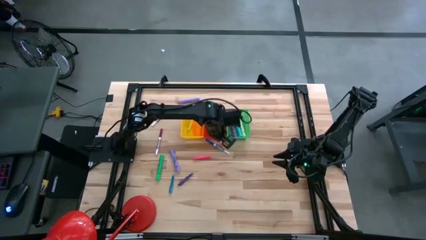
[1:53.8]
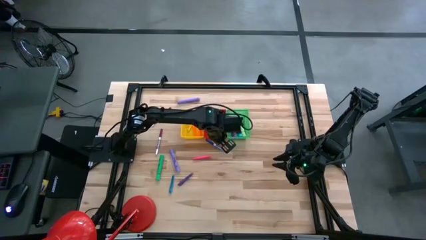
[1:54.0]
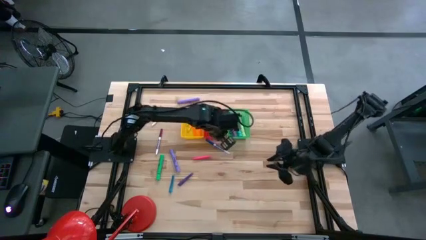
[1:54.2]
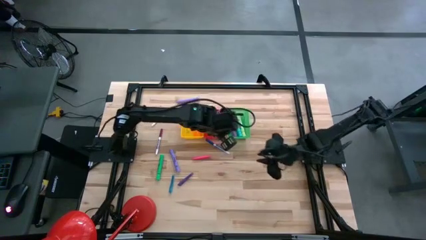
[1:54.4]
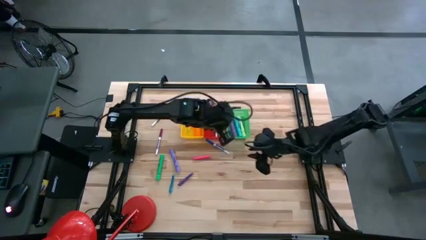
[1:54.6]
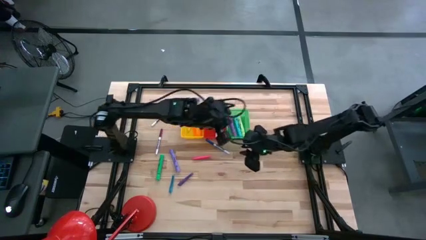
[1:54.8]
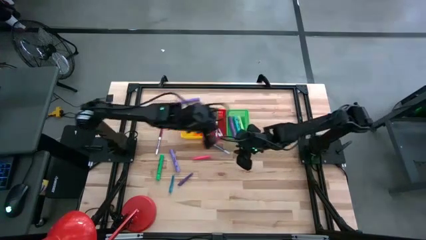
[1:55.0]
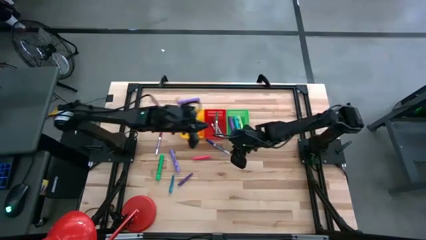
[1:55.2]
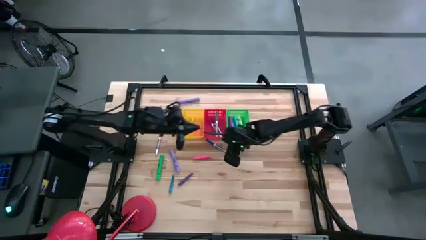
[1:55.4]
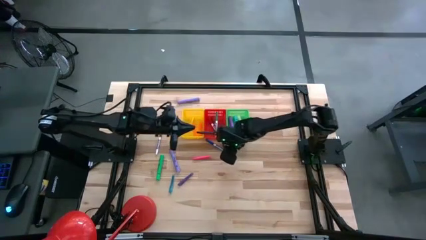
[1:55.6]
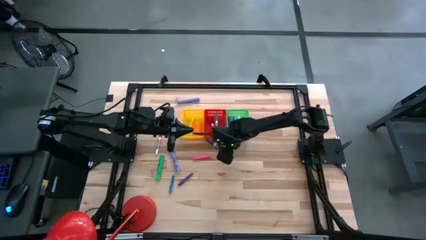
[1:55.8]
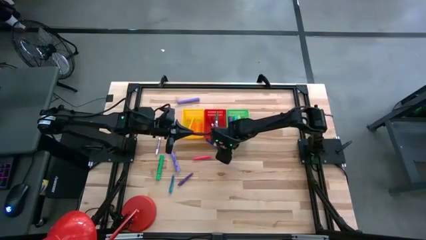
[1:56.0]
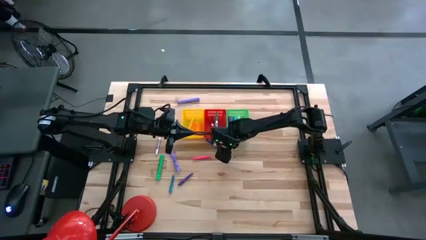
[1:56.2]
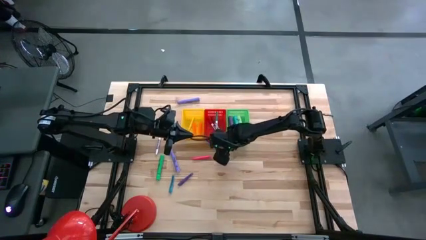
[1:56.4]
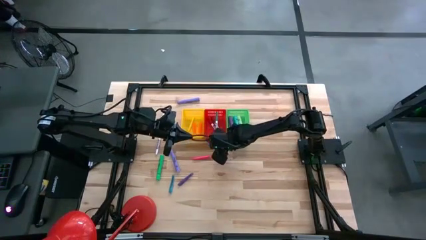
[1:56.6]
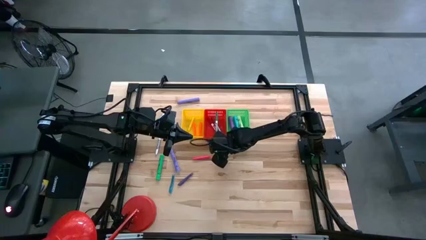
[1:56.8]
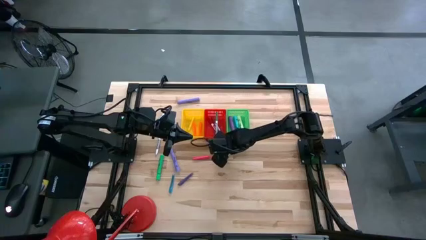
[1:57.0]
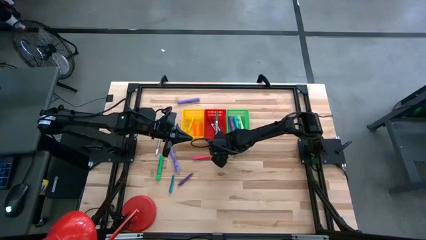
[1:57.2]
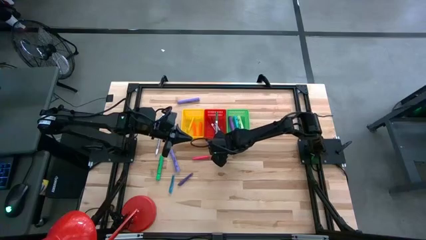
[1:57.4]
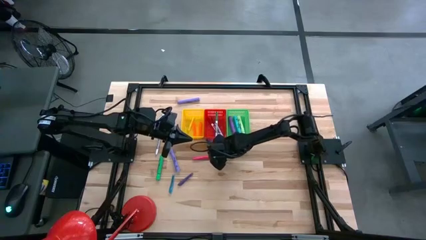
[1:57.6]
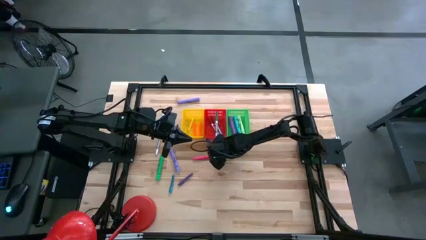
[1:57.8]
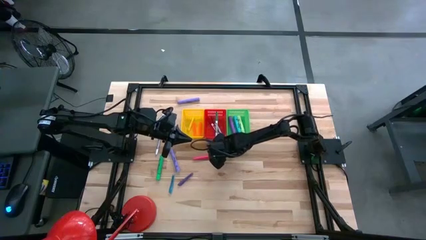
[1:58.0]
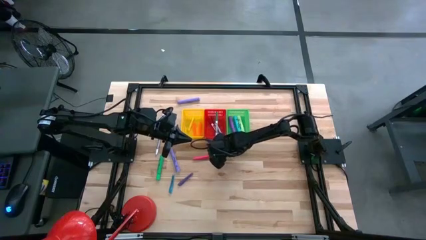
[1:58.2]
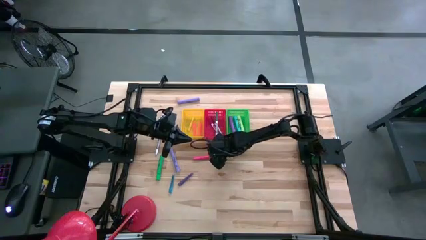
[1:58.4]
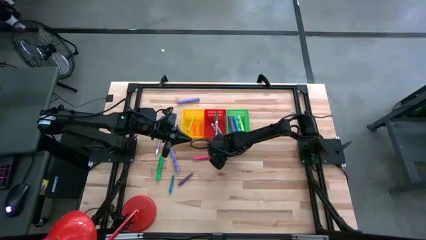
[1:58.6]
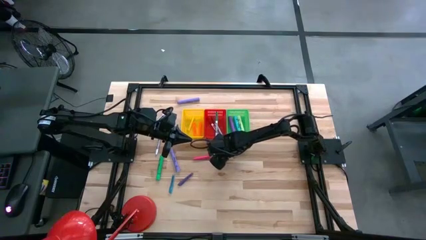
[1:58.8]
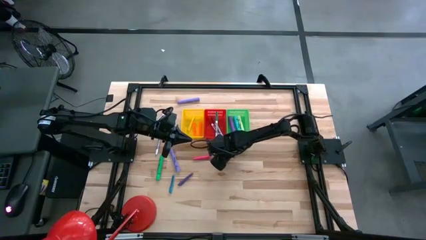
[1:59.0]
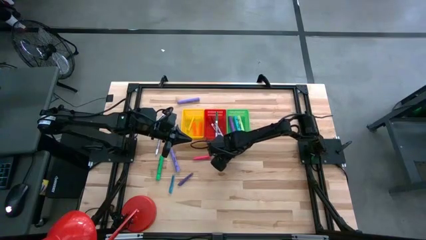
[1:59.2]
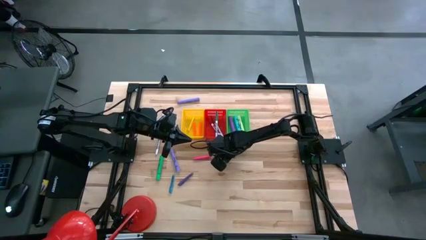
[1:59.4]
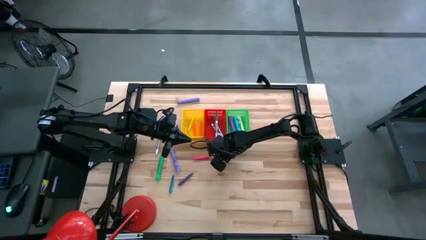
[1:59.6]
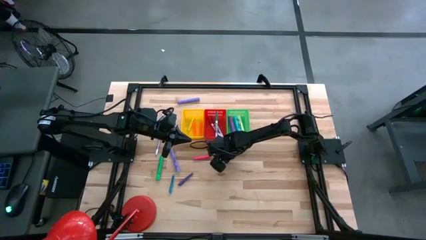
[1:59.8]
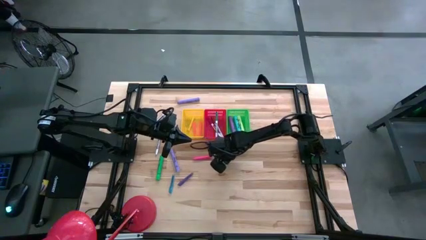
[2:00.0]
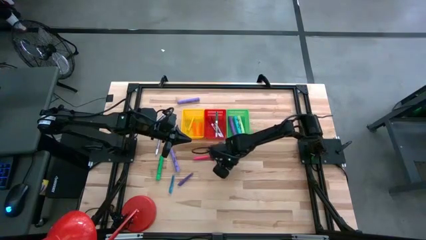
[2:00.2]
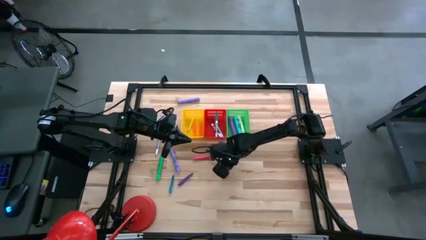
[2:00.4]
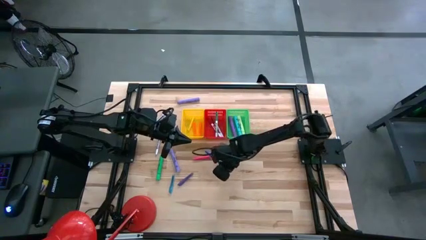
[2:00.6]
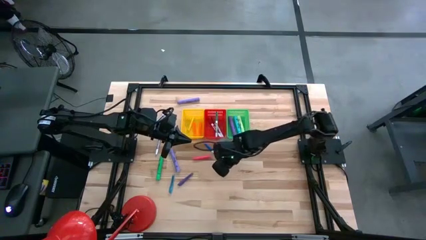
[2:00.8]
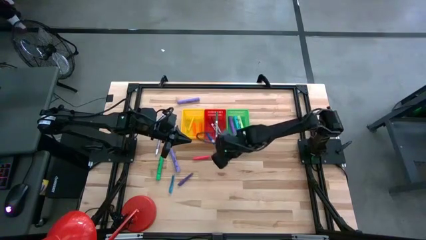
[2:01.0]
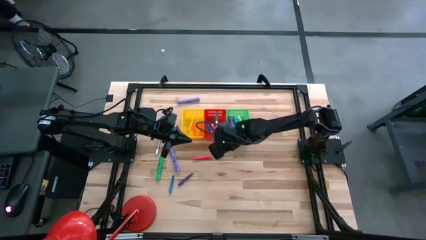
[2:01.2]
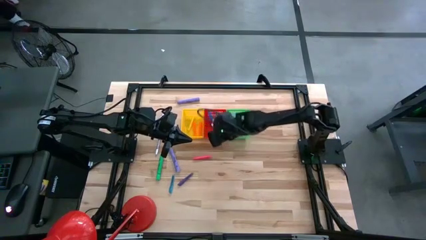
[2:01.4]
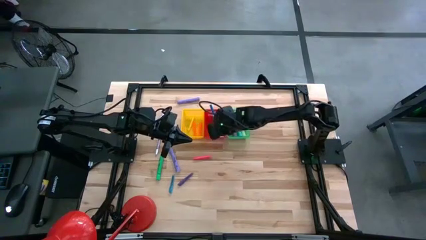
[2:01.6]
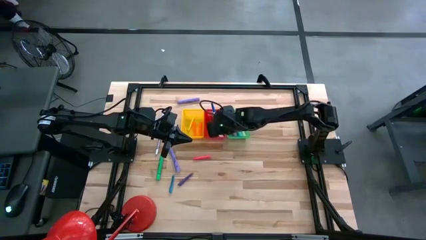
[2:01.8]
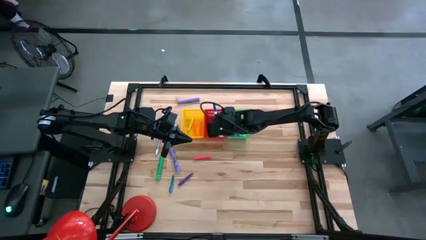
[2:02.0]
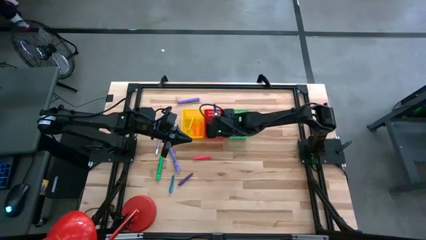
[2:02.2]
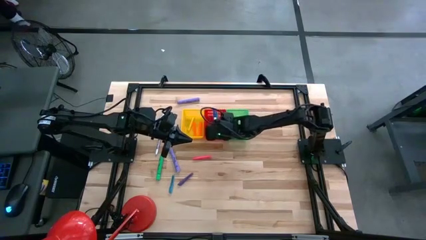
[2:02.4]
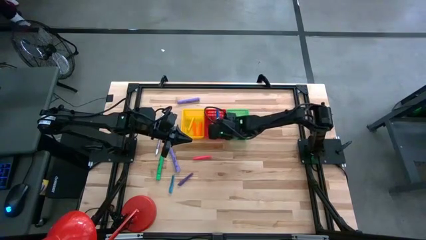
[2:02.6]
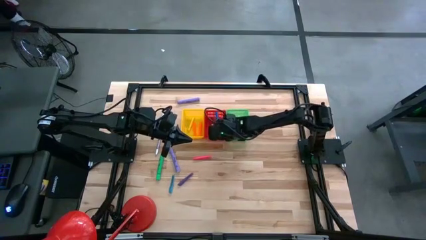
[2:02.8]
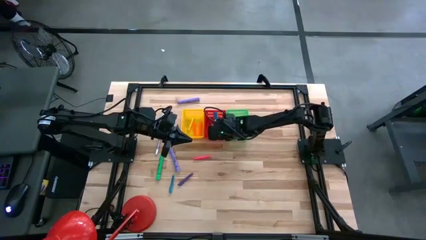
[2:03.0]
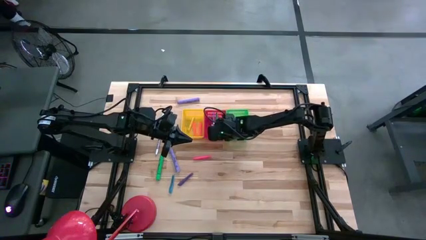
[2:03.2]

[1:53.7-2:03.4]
Task: Pick & Place Markers
Put the blue marker into the red bin

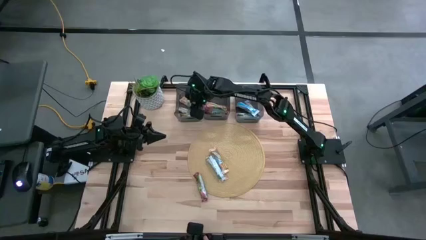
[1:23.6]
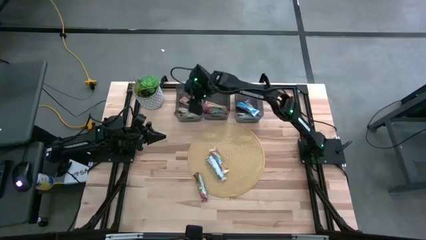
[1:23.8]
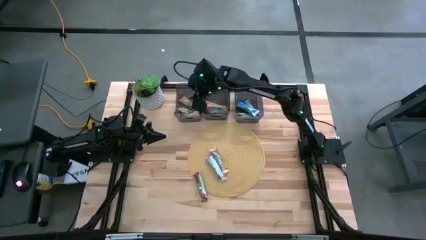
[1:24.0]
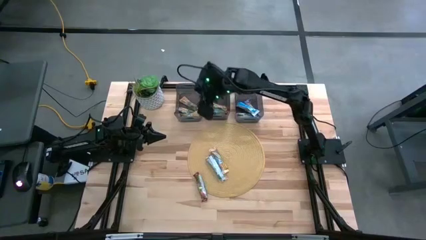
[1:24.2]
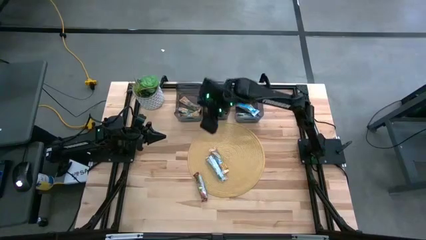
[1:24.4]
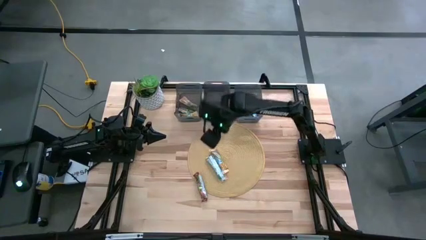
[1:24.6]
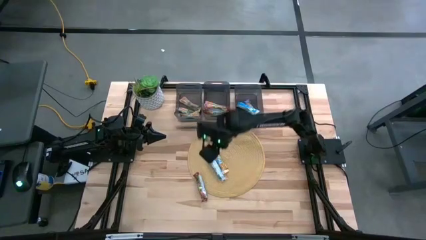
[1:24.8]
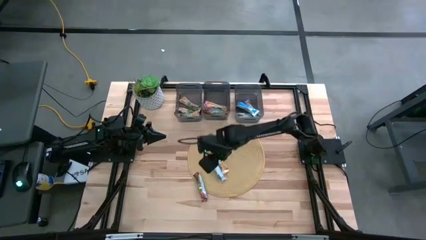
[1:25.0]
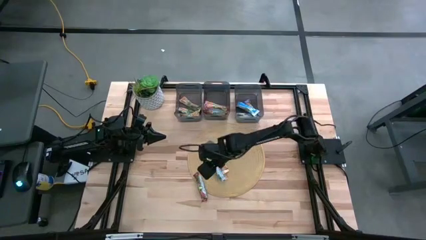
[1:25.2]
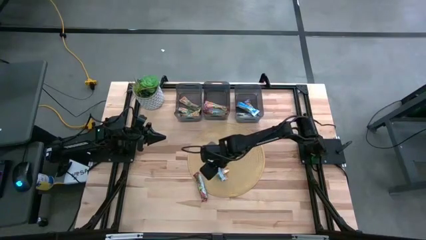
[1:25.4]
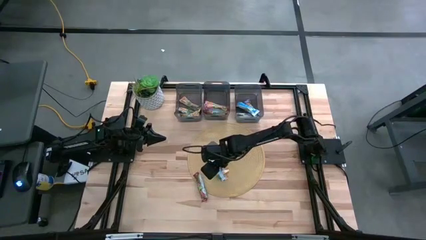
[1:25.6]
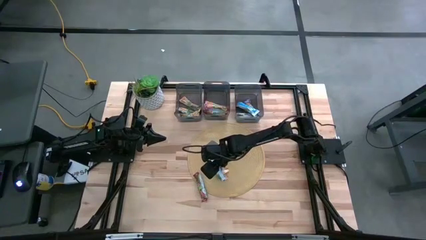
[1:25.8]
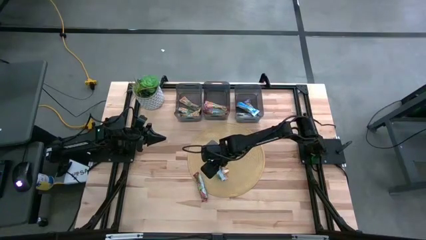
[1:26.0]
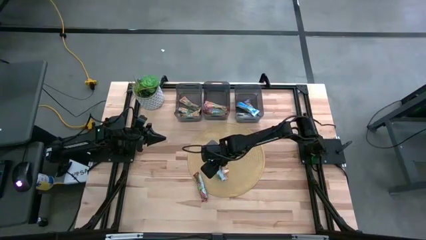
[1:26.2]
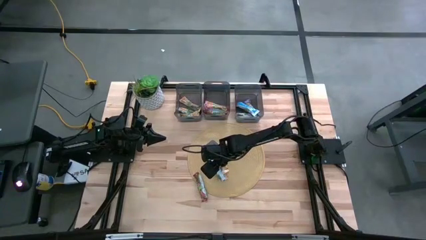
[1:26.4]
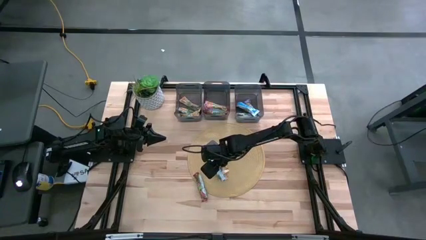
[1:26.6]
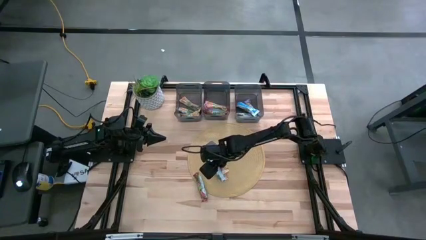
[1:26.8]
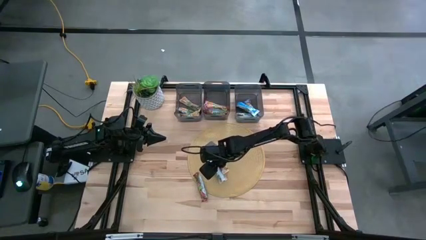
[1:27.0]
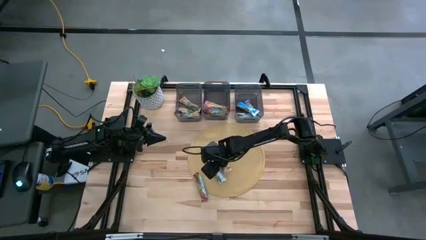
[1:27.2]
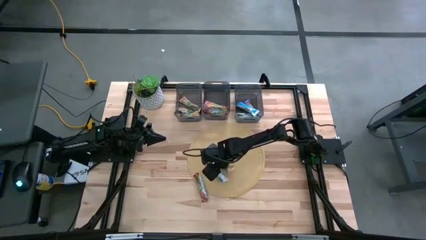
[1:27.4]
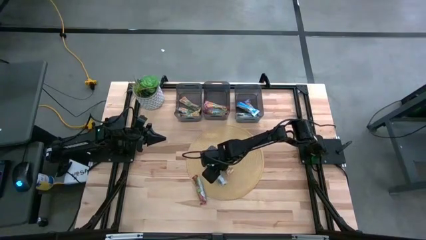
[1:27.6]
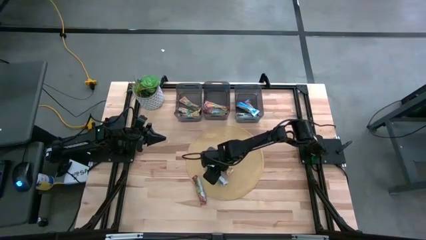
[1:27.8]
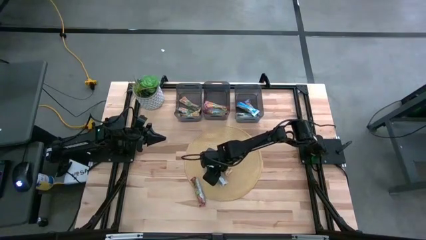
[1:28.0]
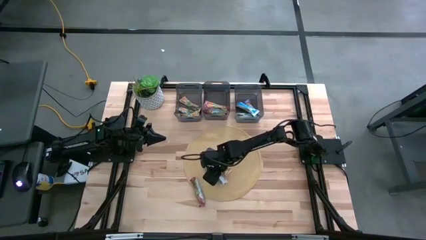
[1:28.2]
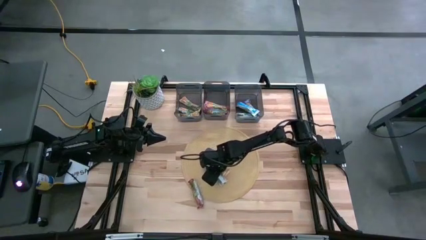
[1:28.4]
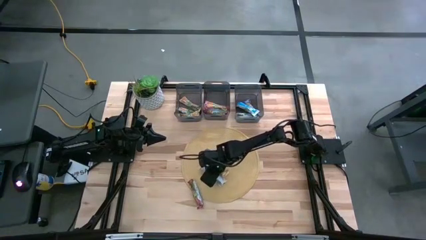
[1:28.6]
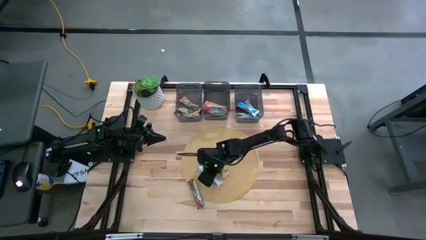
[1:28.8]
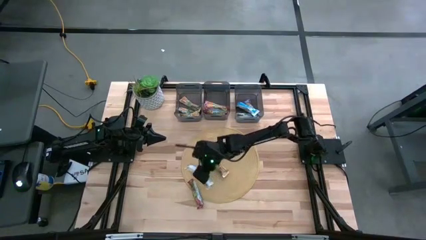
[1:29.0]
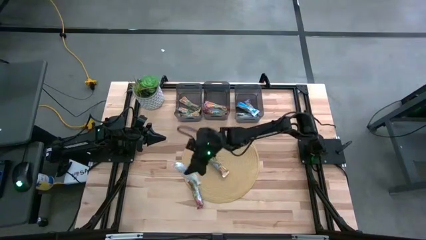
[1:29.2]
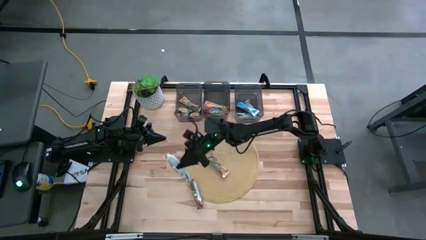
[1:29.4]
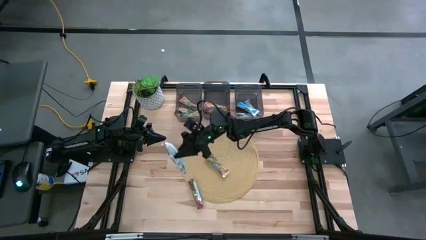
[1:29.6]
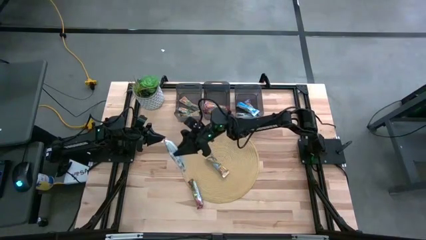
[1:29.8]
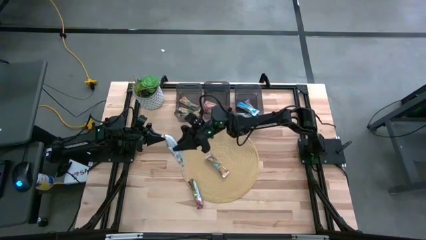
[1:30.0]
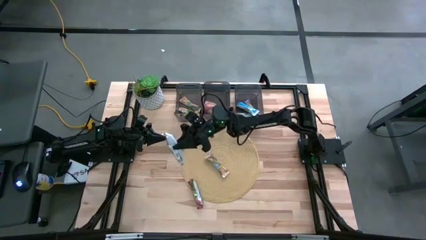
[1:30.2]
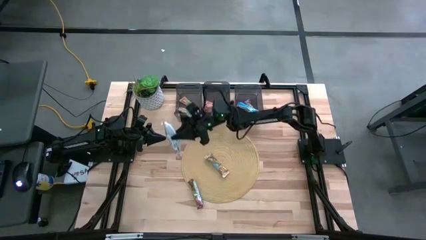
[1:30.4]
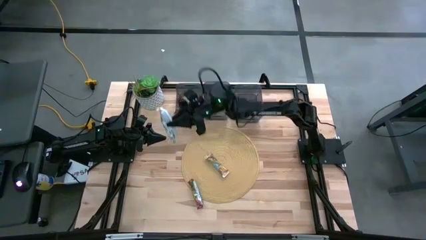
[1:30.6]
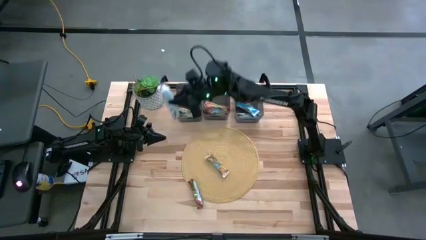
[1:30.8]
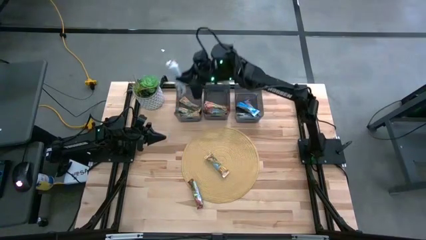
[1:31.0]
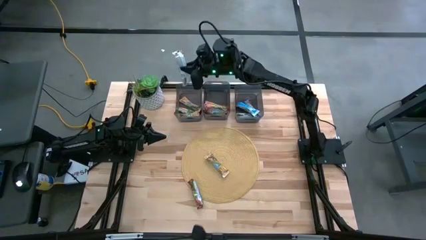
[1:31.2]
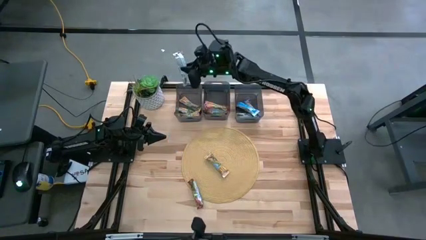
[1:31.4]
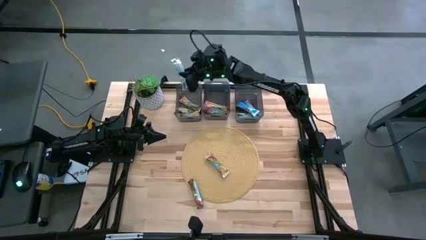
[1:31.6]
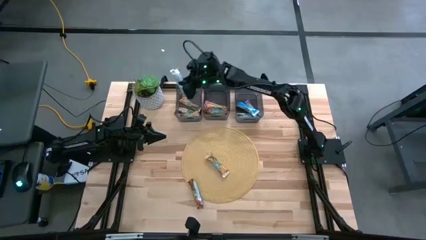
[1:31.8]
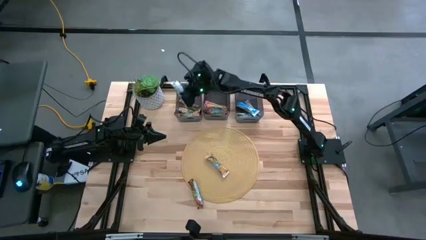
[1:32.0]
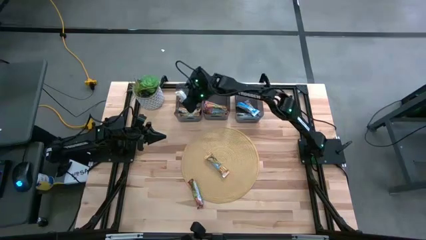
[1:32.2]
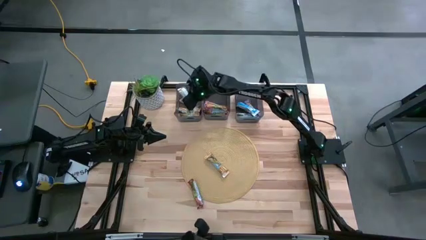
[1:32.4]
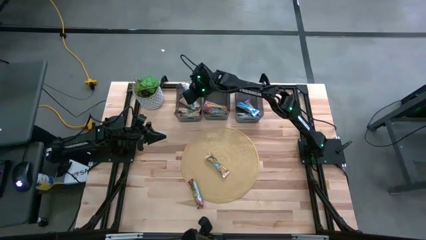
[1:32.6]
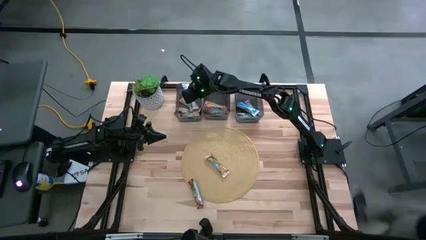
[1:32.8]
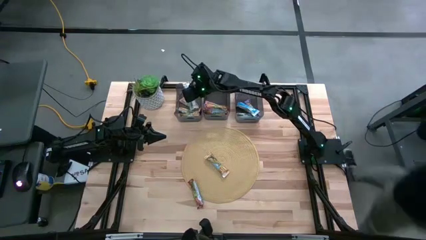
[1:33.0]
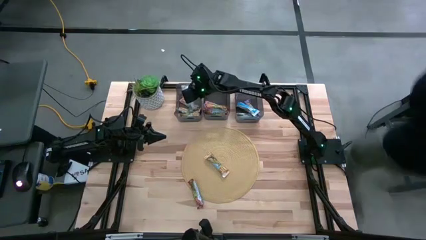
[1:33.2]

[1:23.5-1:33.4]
Task: Pick and place Granola Bars by type
Put the yellow granola bar into the left black bin
